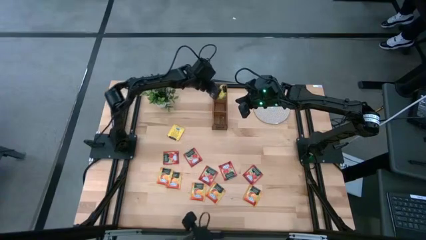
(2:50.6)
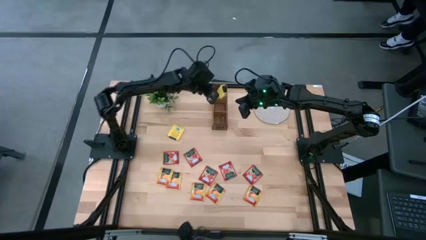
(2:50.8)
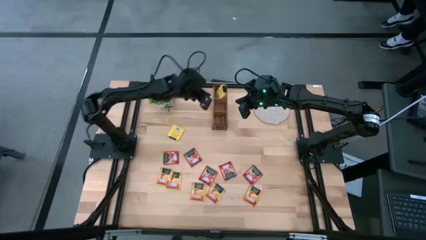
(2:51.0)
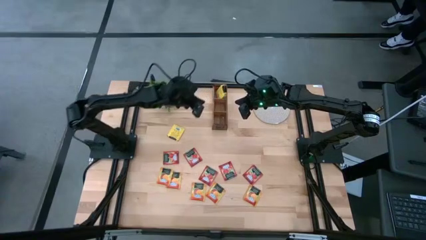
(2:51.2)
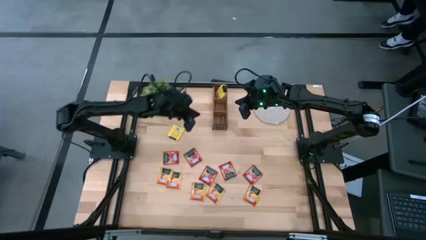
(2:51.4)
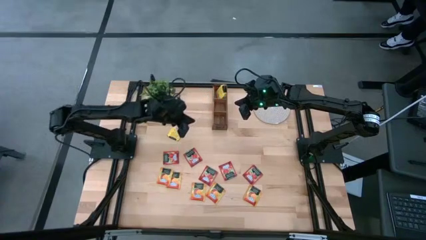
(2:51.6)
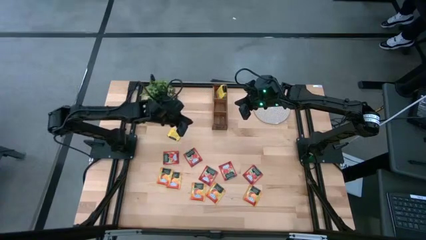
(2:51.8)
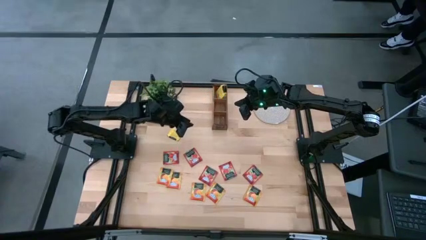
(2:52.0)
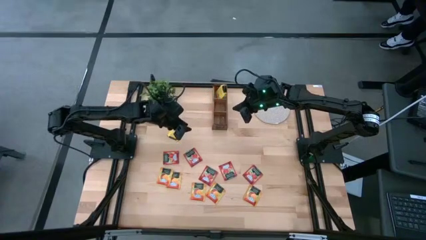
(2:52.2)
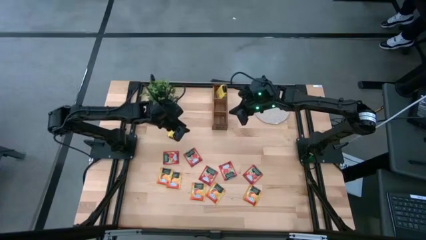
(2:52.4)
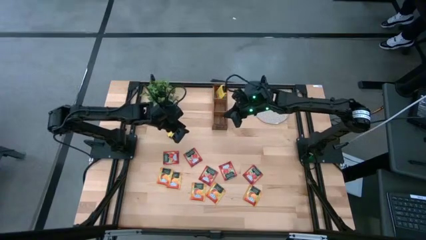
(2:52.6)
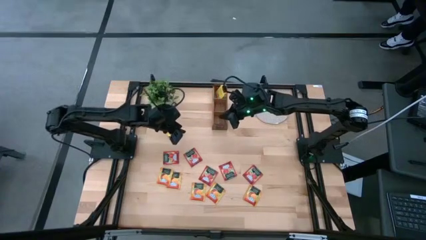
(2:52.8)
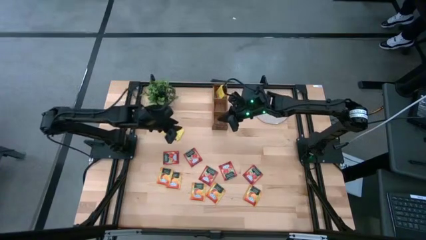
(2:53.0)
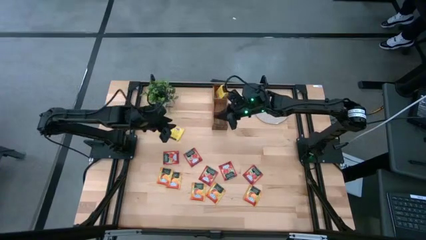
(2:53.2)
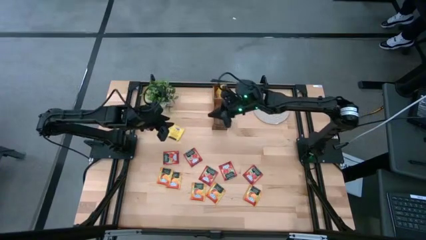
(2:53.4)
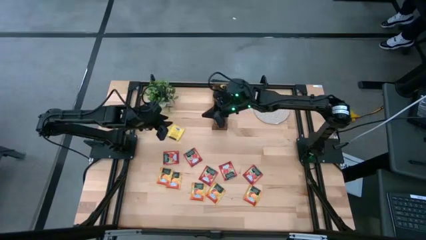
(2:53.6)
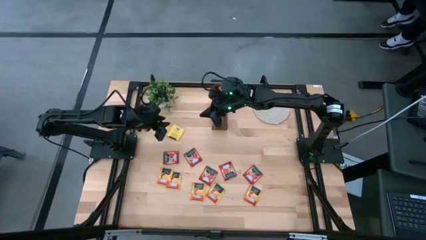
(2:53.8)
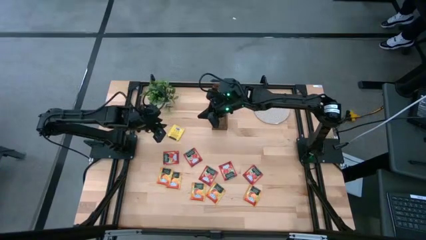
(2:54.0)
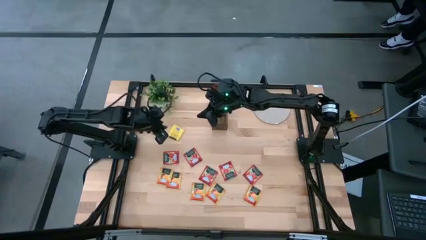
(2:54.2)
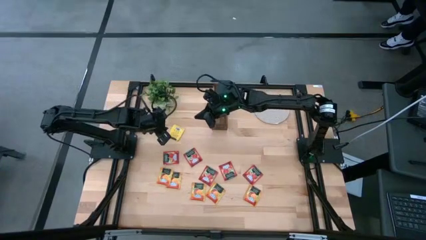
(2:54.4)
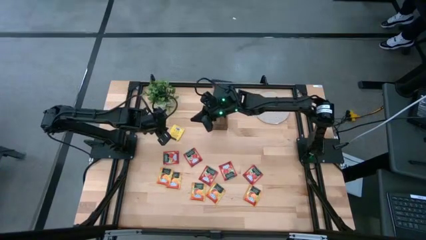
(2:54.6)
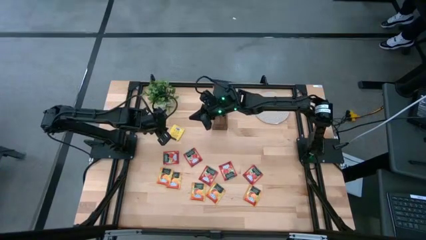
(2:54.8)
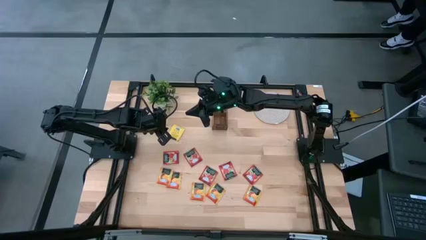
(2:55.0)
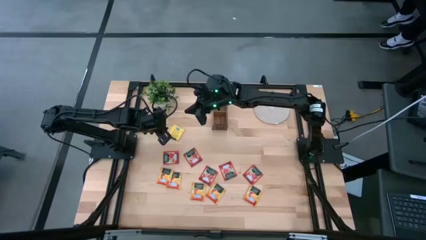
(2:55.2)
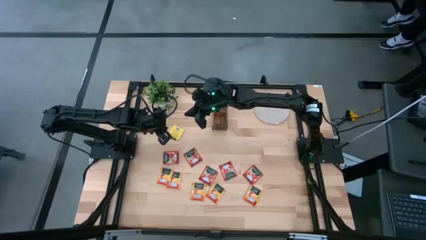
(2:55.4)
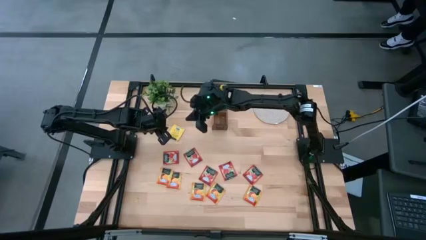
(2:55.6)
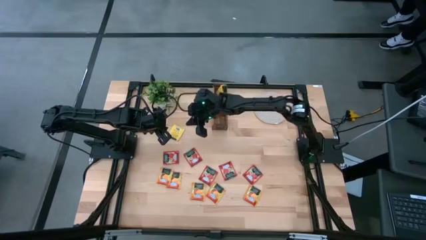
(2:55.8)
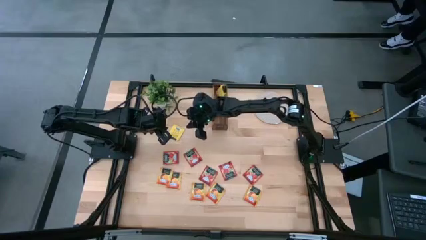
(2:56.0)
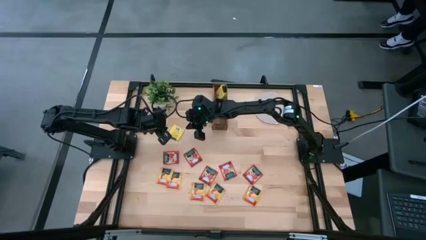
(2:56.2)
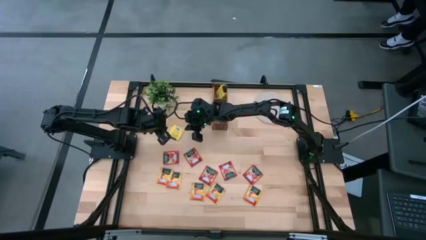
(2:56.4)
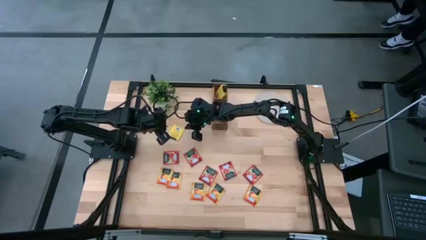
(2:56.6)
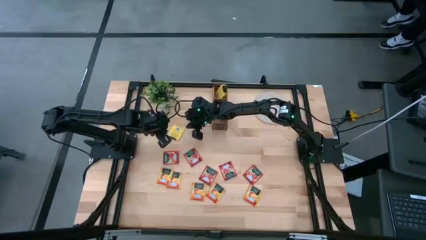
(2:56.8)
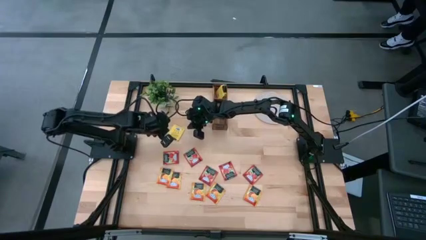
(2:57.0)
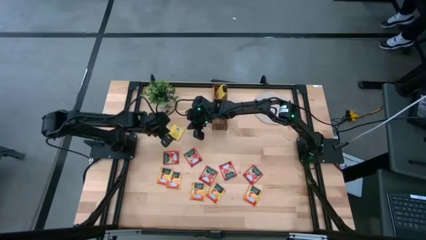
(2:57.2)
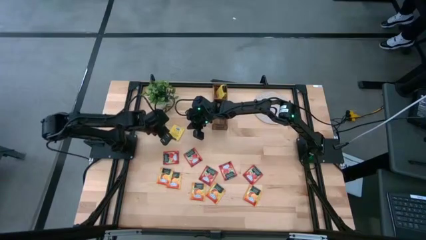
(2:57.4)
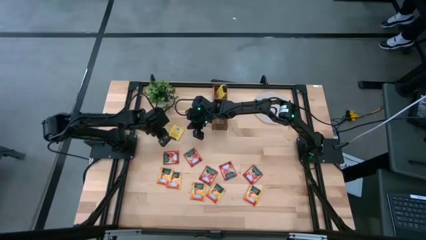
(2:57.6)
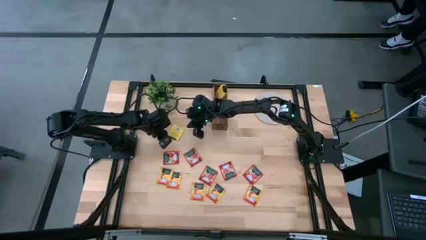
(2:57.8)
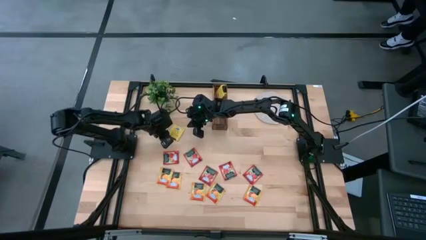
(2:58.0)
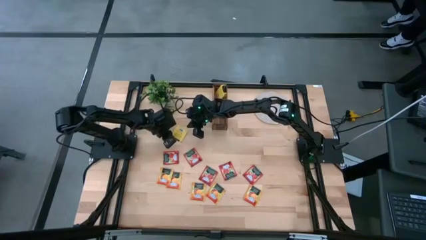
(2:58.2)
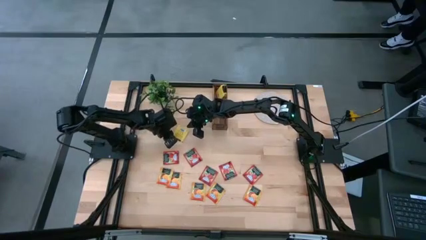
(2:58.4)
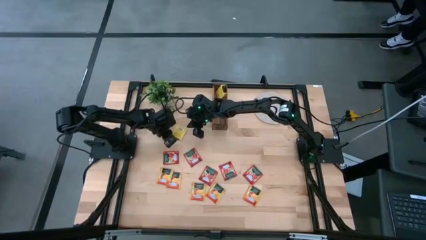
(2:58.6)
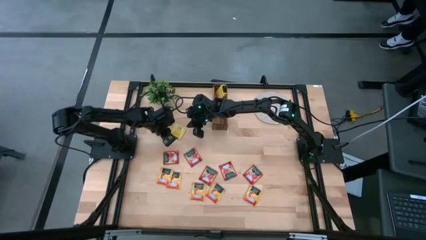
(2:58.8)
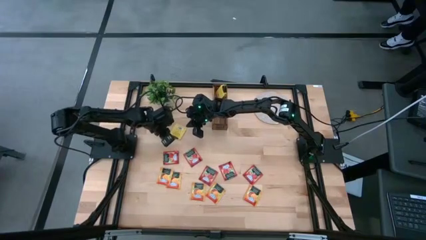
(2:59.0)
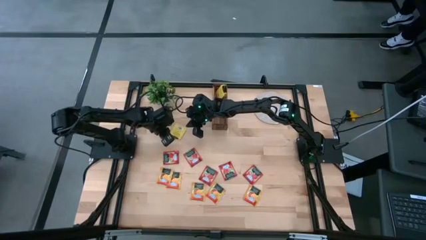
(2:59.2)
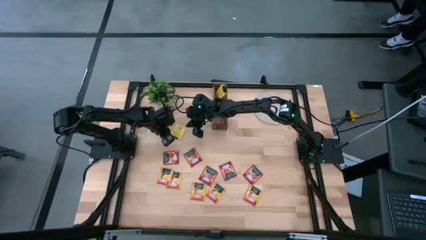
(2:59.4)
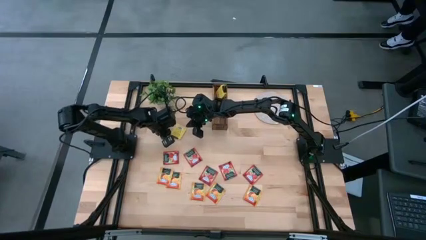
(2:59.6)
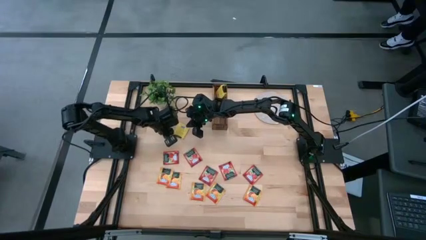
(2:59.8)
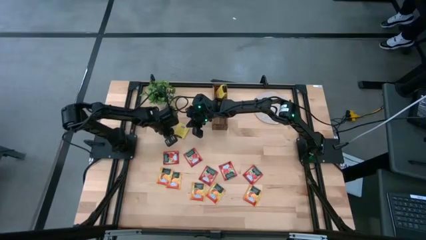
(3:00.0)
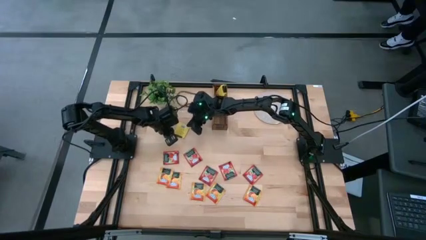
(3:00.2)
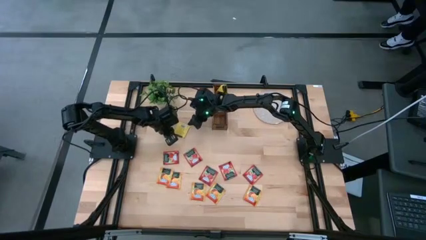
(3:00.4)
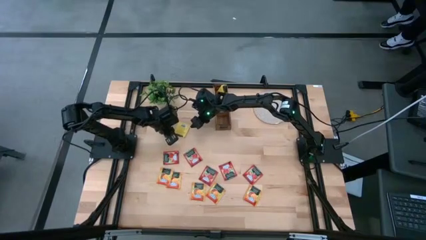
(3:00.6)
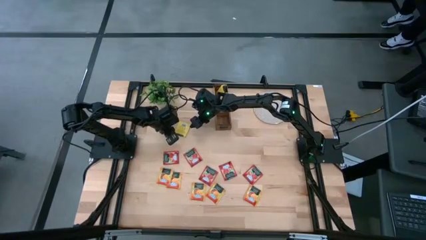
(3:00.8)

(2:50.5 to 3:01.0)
Task: Pick & Place Tea
Put the yellow tea bag into the left section of the wooden organizer

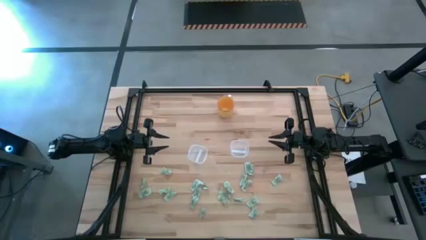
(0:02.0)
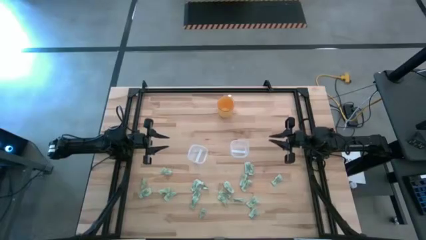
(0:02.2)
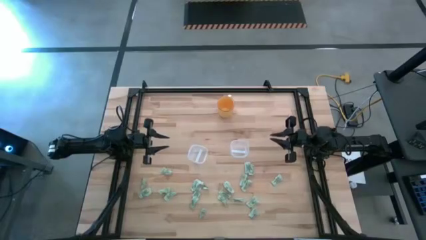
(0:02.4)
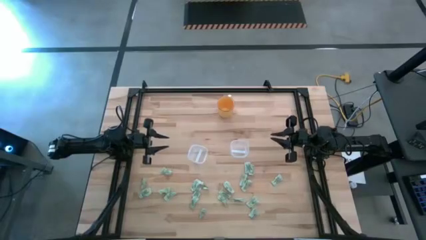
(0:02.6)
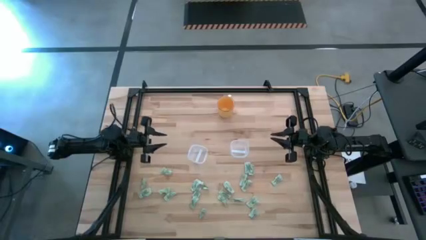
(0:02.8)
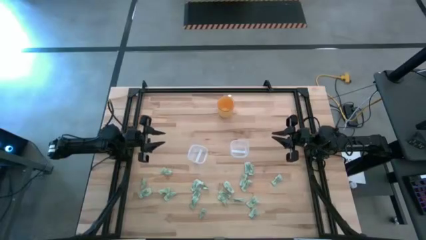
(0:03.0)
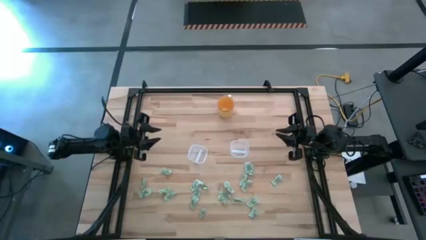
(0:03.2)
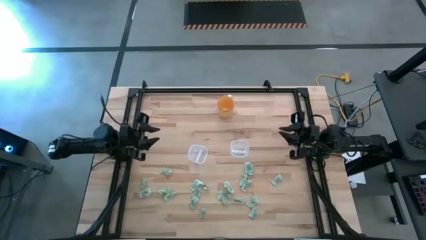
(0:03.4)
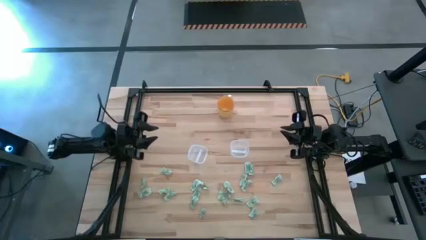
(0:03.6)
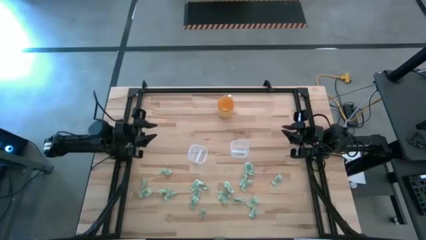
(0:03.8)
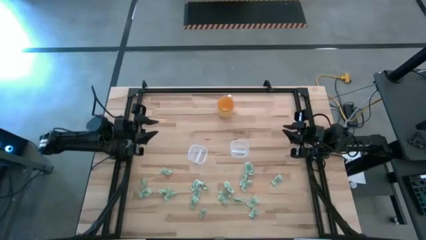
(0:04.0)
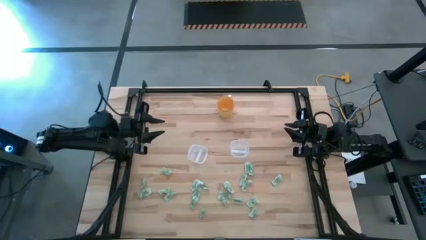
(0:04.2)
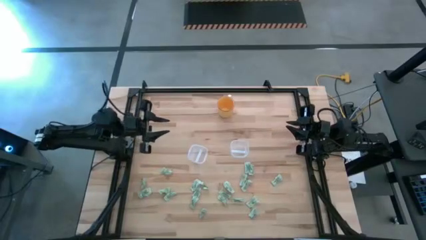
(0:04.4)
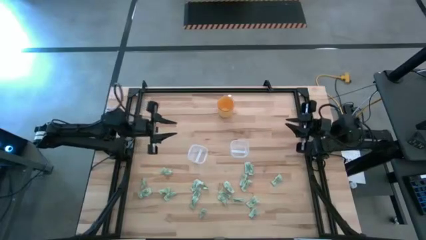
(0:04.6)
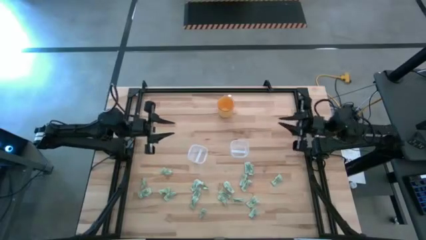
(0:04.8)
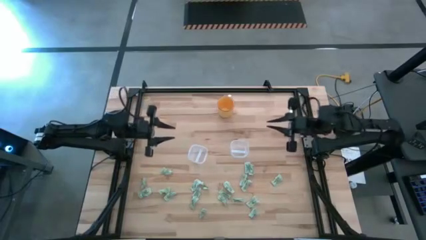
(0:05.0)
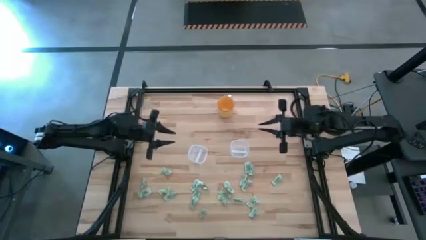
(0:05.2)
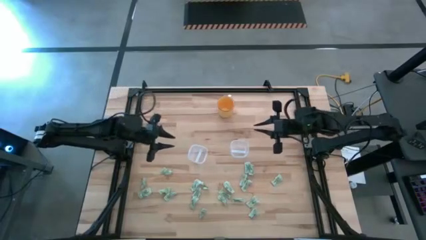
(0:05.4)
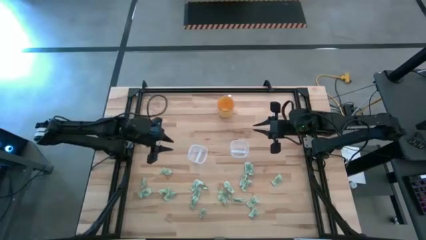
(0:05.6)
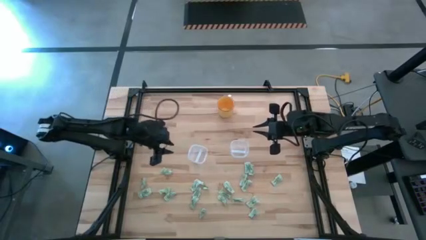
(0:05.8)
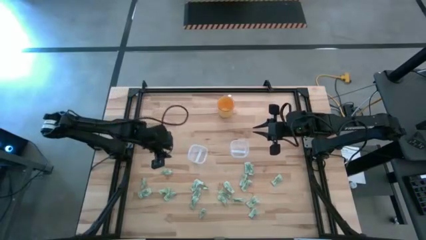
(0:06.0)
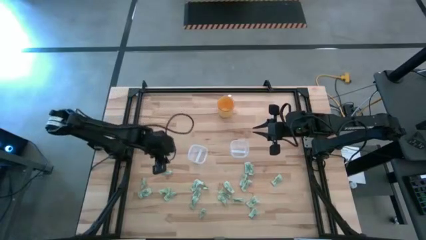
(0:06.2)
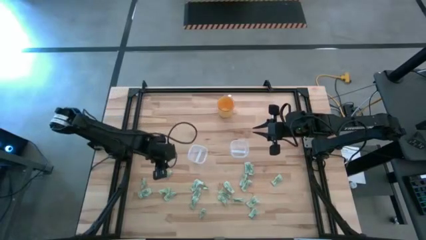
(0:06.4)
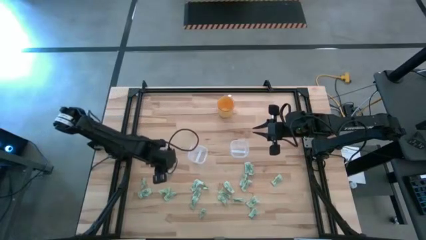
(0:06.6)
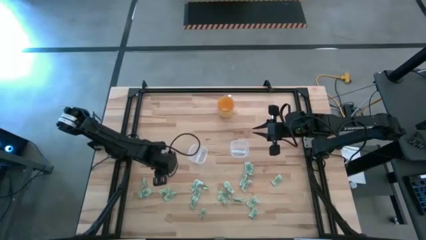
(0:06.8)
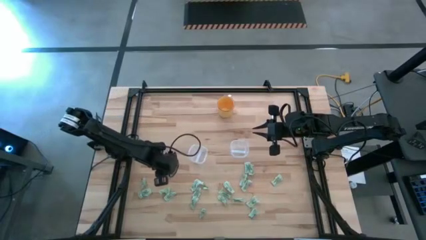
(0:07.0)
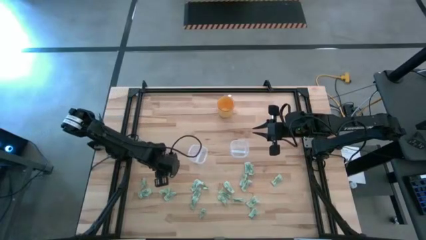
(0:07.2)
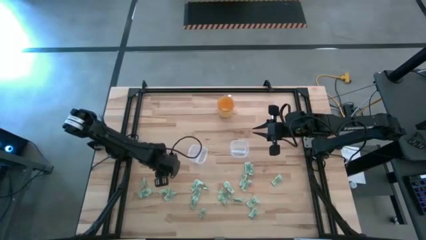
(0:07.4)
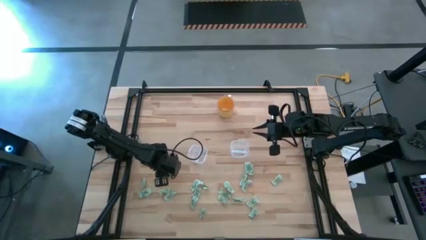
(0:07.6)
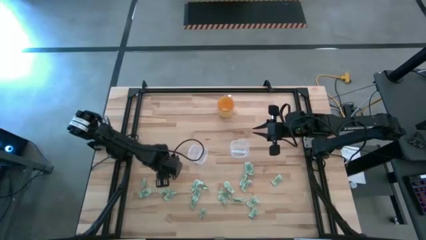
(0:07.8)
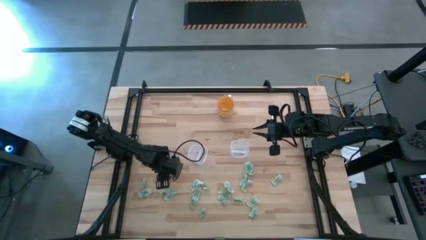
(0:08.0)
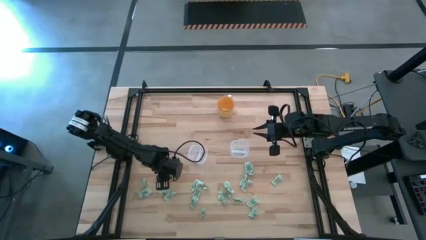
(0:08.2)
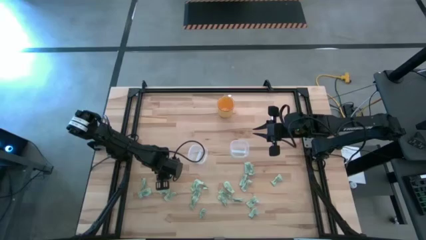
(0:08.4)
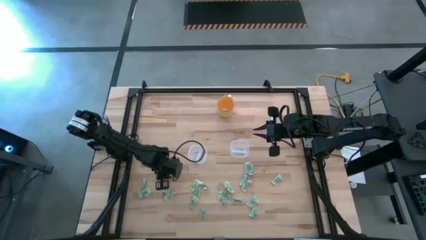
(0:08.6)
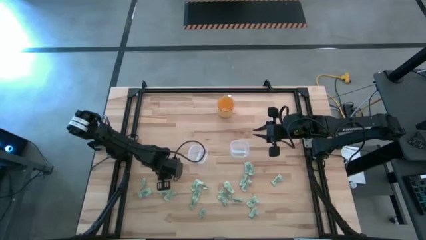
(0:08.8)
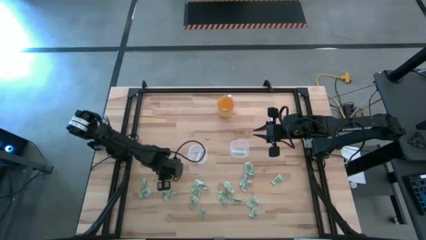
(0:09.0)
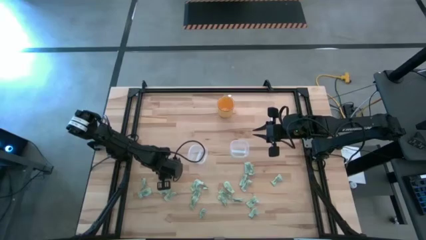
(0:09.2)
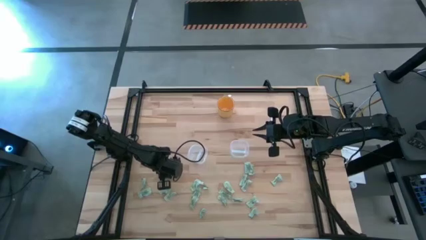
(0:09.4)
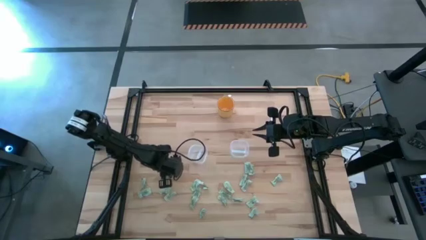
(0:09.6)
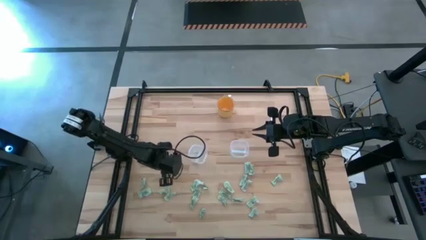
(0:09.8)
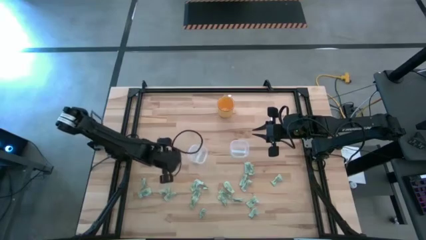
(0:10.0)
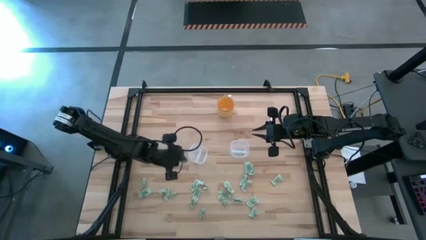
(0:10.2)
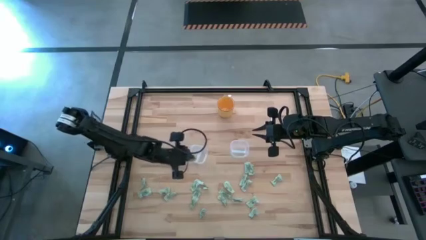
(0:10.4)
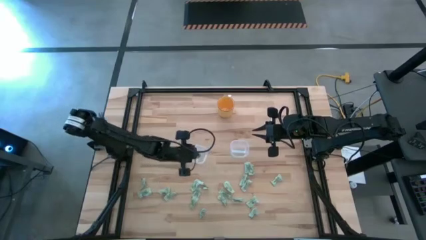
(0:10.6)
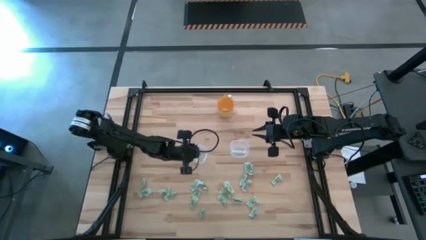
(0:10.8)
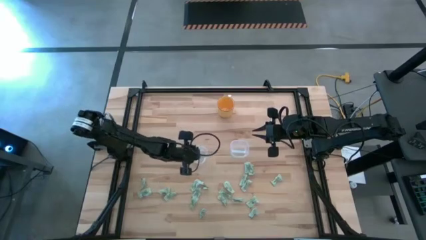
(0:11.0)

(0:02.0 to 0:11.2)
Task: Pick and place items into bin
Put the green sweetener bag into the left transparent food container
